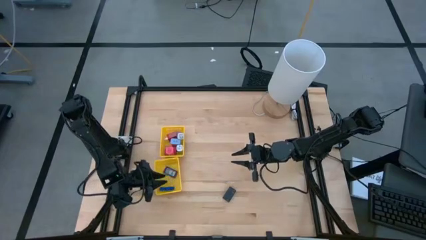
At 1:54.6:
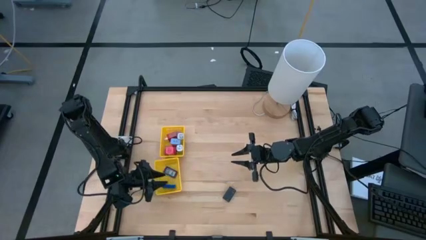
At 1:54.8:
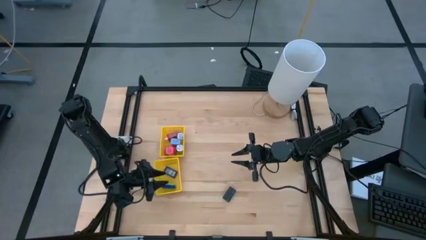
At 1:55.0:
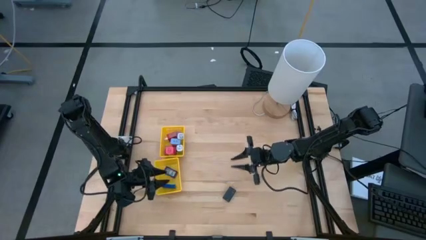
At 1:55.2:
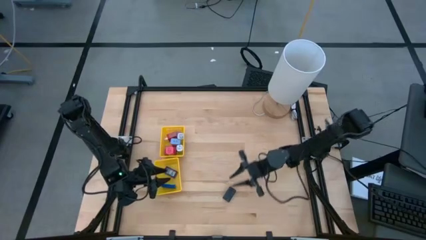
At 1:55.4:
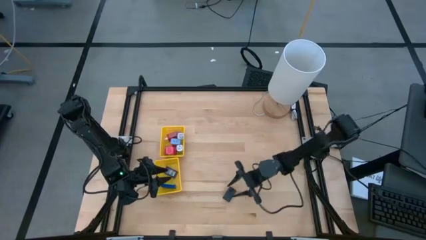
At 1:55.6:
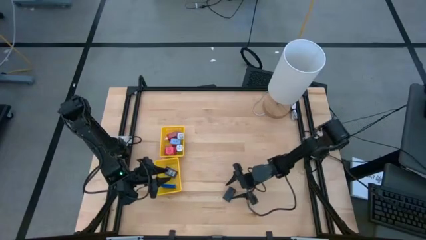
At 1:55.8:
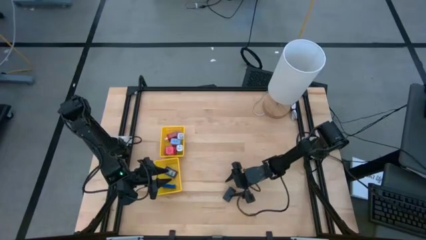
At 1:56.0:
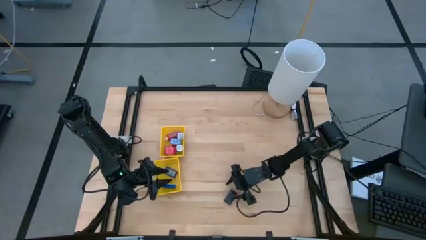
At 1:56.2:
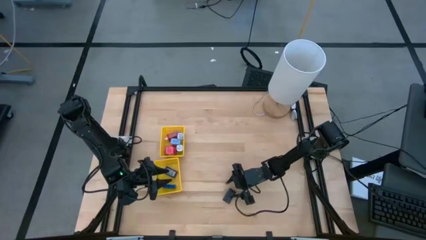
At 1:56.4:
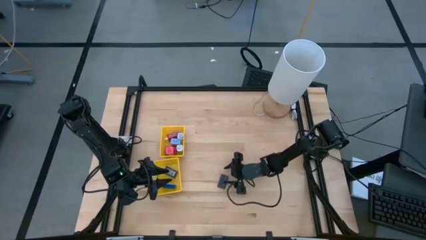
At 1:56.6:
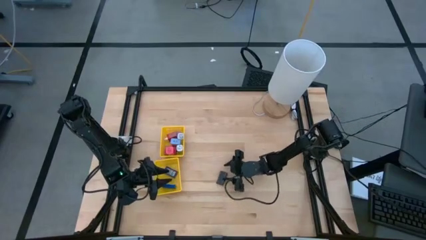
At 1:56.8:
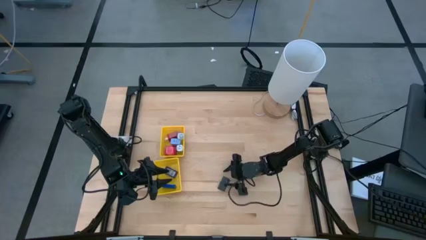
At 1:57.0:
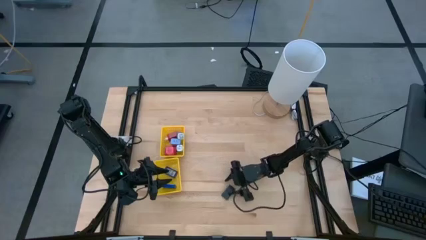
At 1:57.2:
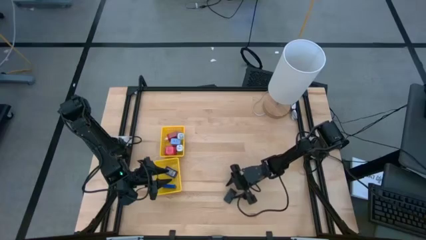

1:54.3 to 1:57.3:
Task: Pick & Place Office items
Put the black digital timer into the bottom yellow bin

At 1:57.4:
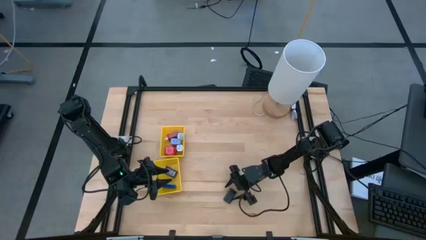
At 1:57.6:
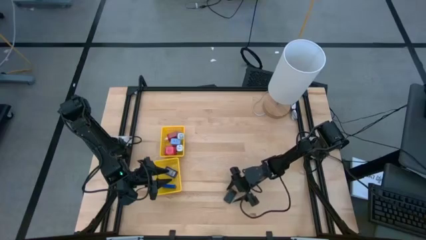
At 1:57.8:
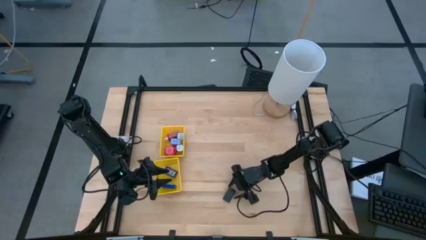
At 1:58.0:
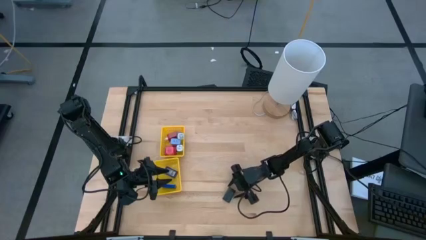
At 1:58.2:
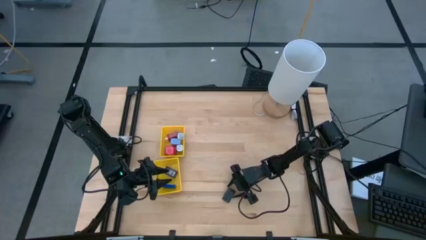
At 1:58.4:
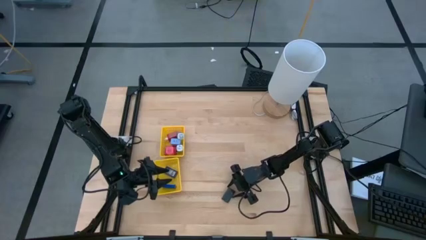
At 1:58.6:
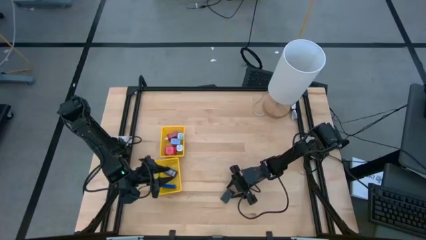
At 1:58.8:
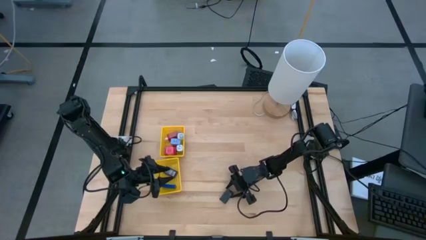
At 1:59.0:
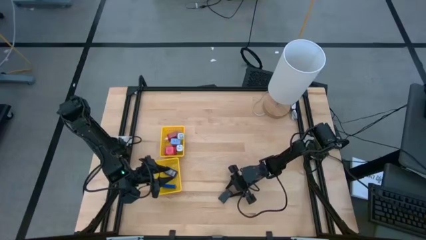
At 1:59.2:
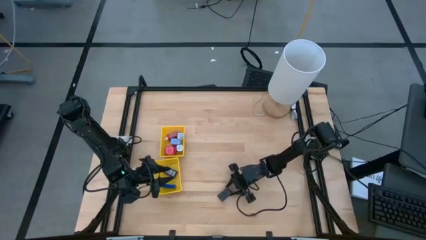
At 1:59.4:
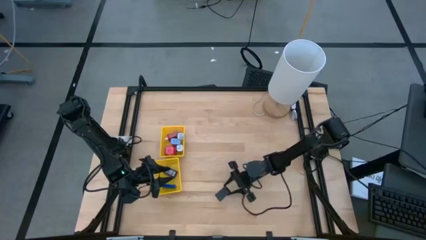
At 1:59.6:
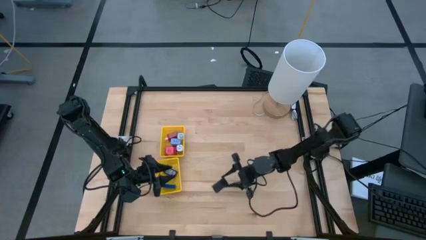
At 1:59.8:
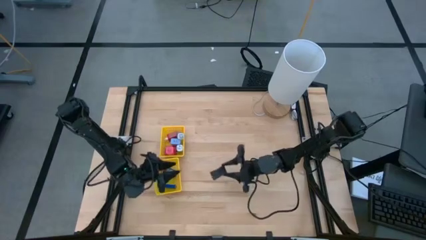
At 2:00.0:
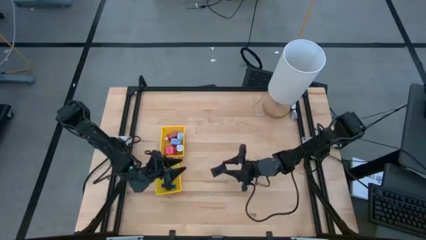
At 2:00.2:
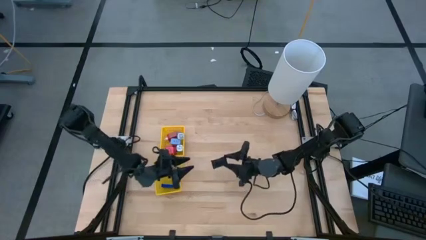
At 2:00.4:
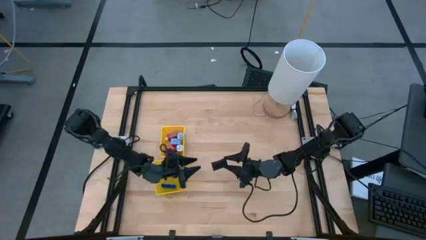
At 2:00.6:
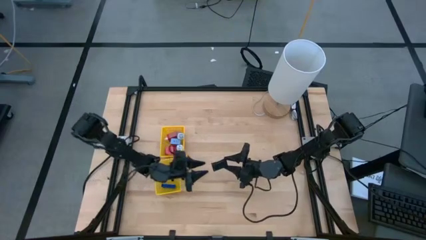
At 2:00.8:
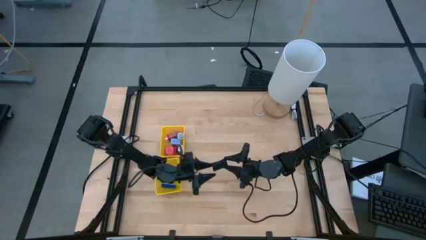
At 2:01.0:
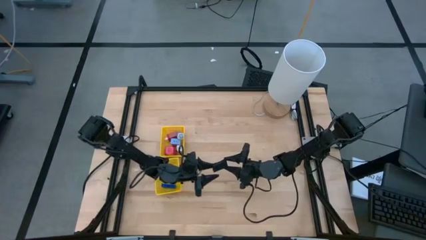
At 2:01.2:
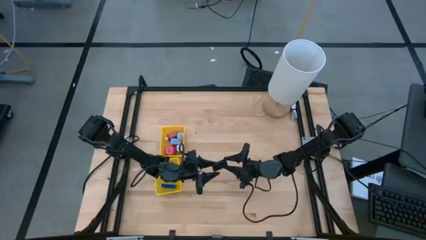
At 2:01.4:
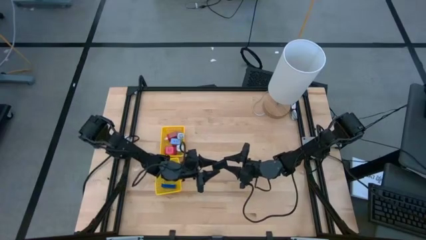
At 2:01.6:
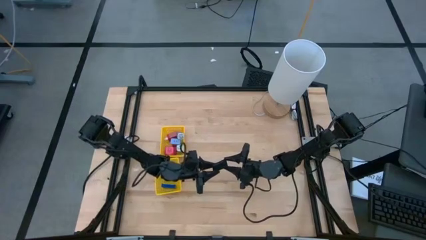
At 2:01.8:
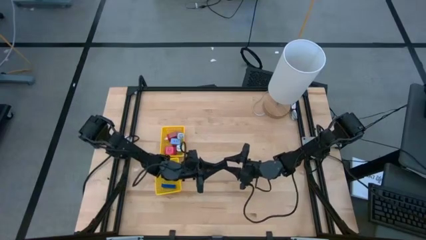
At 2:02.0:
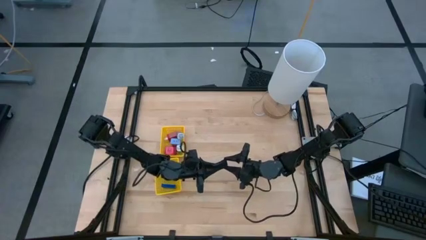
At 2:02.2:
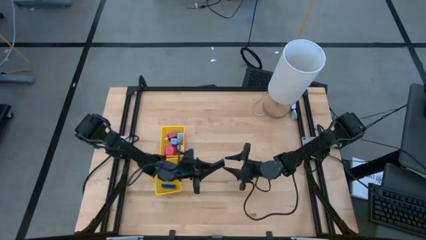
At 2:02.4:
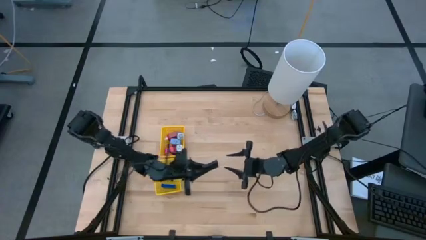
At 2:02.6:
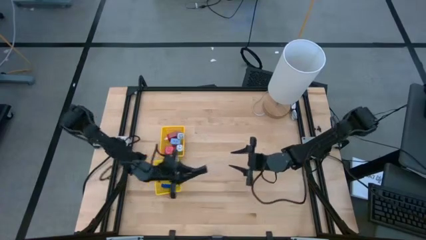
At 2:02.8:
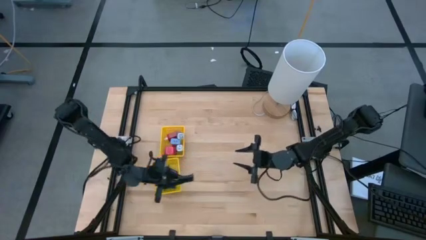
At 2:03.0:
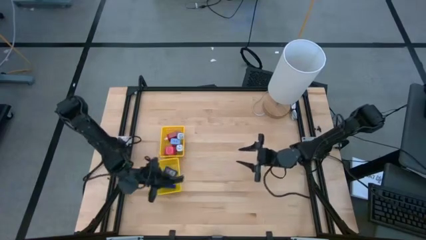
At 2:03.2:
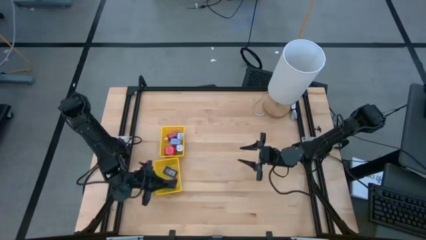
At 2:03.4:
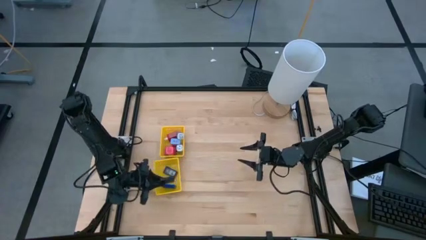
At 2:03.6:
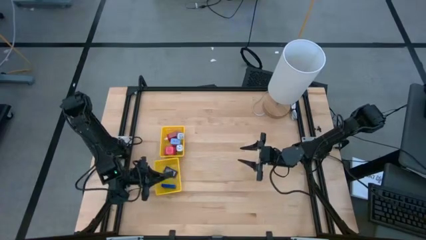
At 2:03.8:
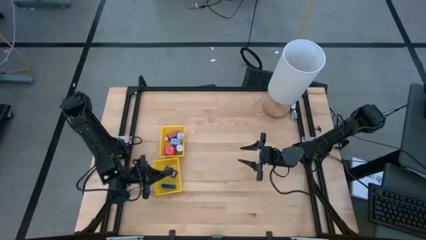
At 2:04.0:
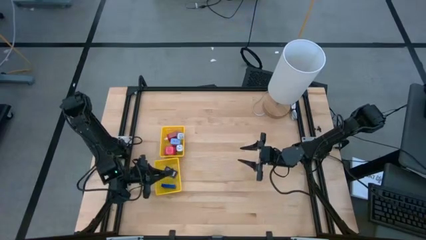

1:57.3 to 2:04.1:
Put the black digital timer into the bottom yellow bin

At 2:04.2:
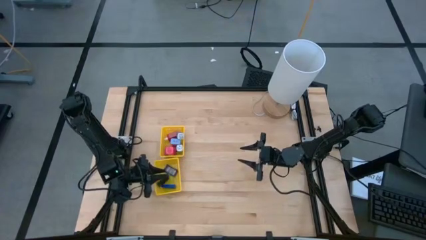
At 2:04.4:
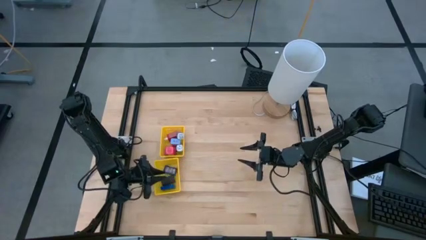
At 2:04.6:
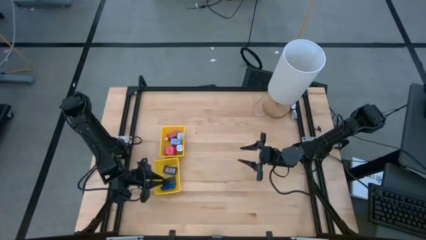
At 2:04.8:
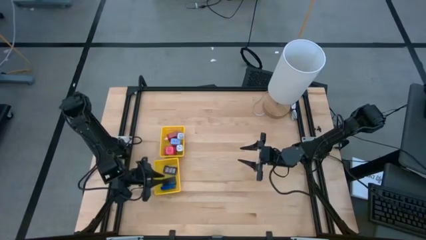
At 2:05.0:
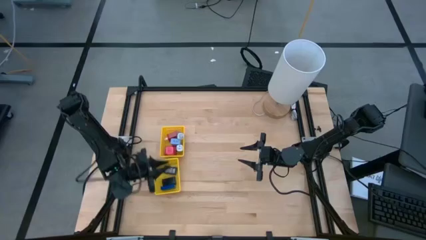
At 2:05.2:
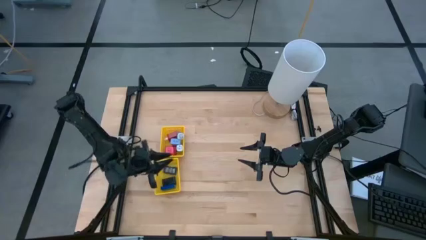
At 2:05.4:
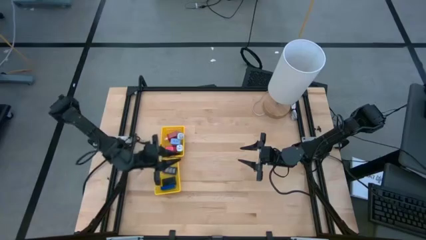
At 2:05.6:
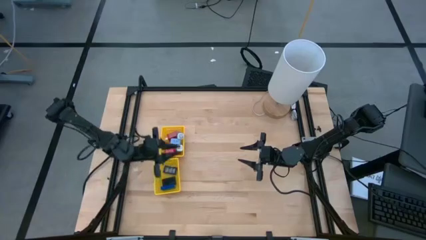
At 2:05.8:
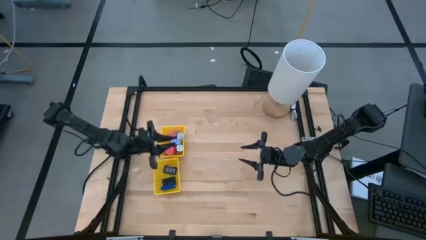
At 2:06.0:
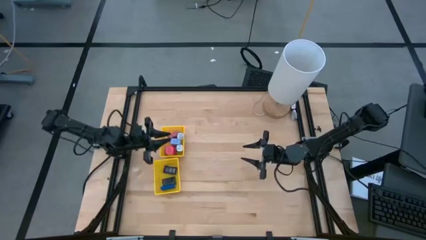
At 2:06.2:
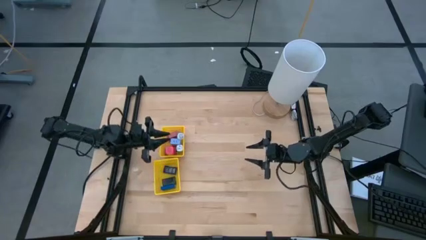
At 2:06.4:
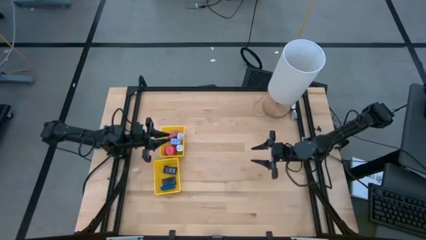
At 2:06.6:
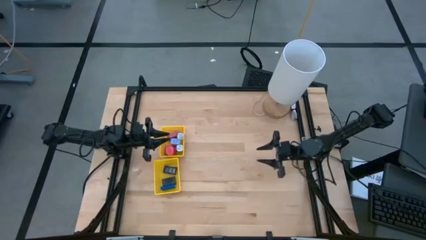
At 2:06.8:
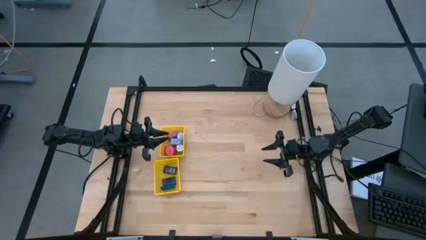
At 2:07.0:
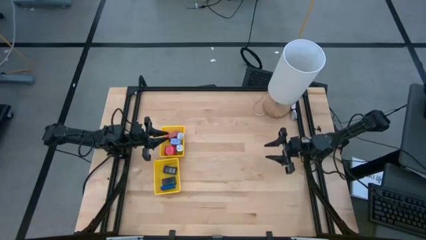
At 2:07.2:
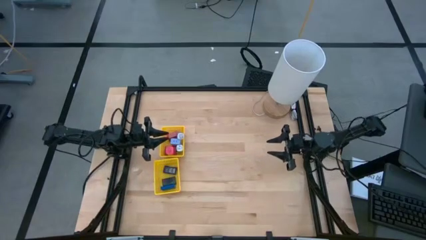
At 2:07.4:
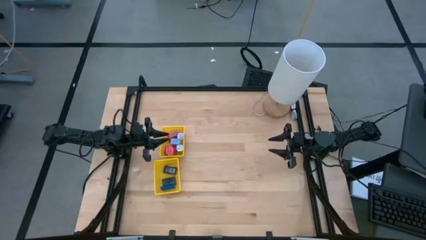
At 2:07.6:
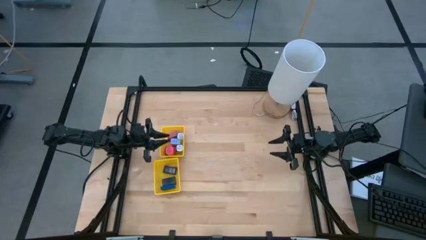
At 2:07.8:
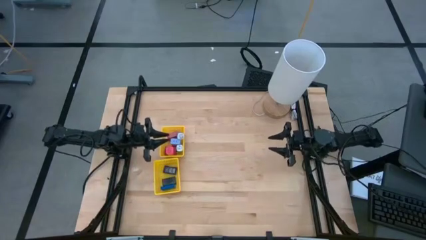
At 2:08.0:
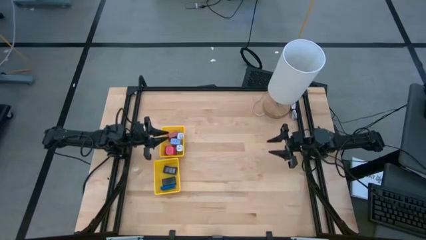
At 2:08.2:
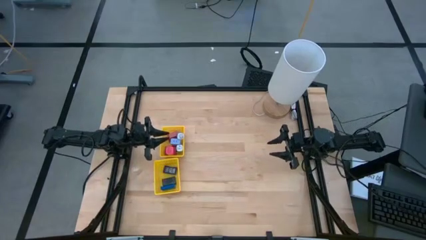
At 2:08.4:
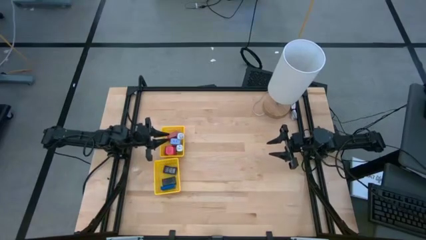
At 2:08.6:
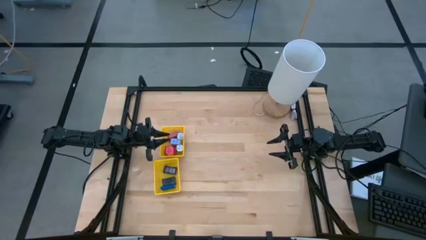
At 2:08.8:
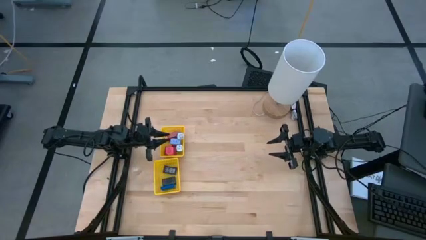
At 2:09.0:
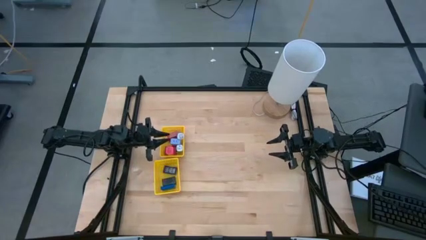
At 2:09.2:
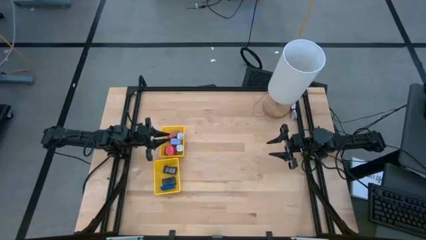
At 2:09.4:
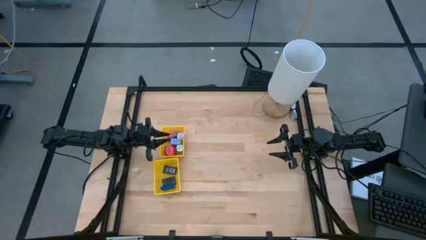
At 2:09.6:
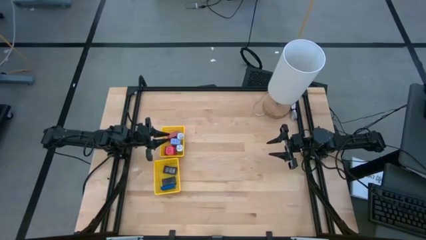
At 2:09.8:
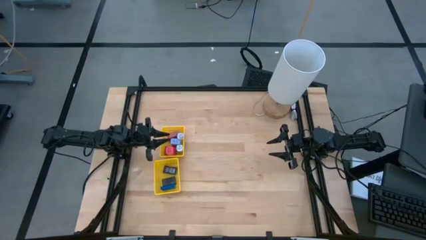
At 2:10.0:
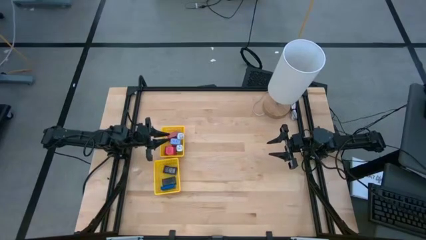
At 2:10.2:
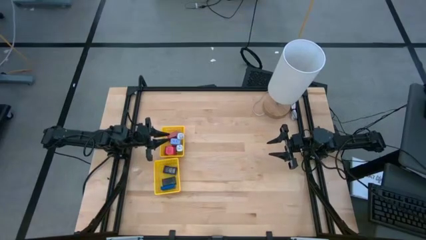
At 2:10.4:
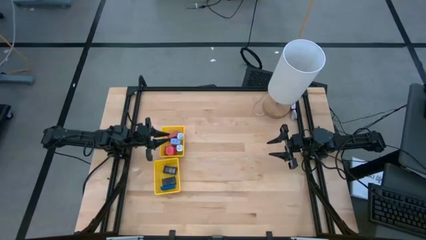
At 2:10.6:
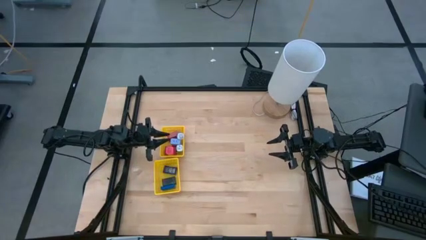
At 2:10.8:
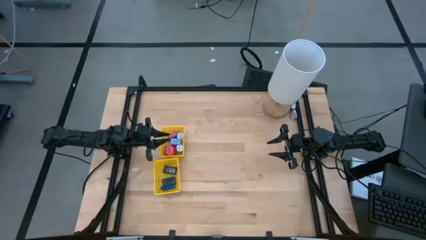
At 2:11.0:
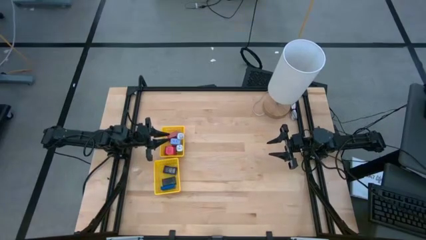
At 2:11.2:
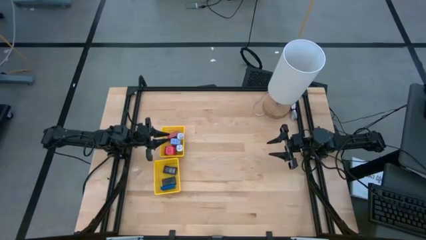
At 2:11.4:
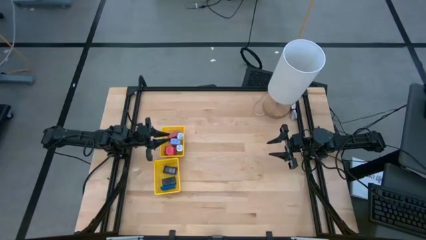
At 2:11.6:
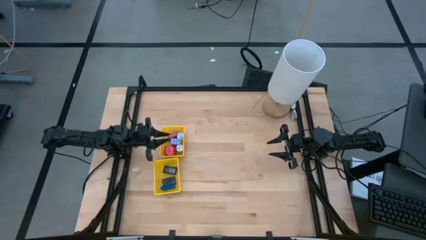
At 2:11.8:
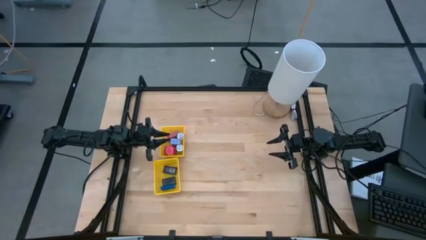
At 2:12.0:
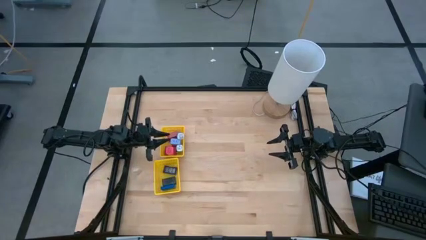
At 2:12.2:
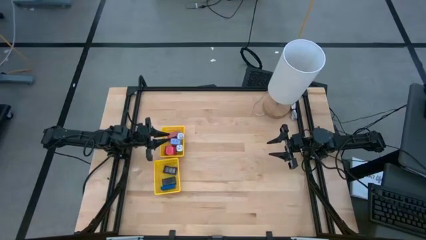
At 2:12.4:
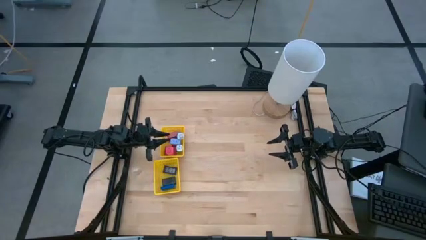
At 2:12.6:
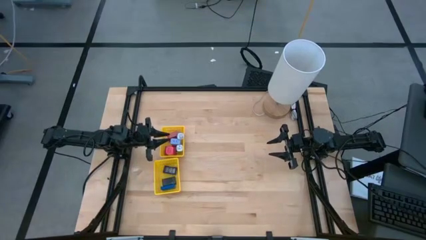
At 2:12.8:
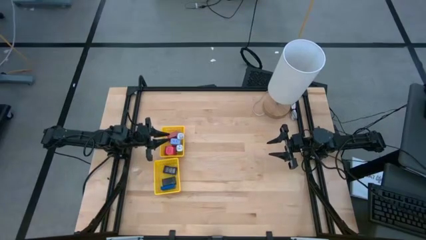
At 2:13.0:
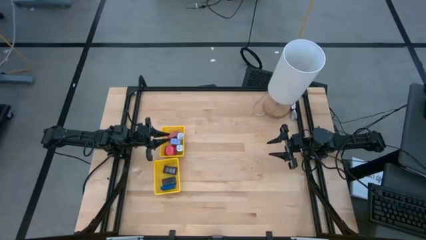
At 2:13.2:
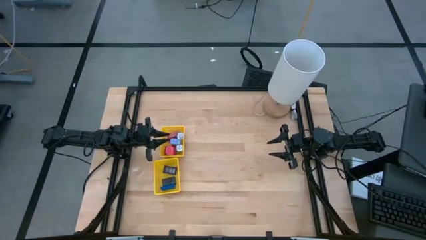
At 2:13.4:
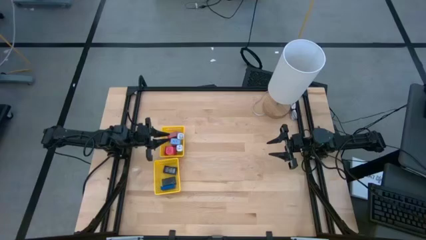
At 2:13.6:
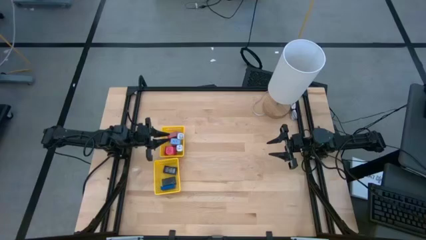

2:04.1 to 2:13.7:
Return to home position
